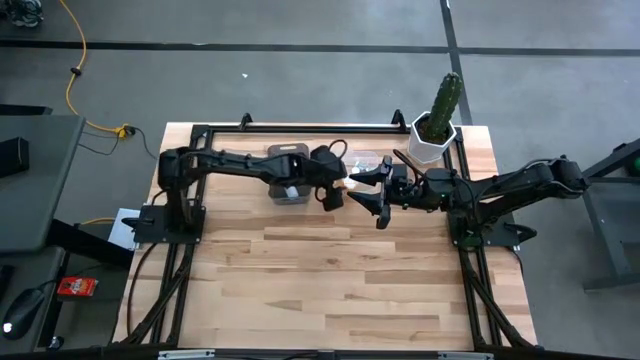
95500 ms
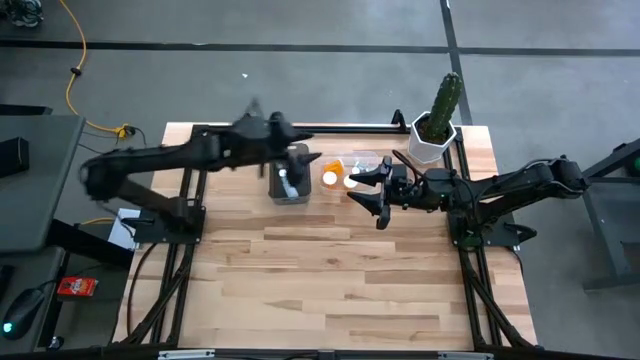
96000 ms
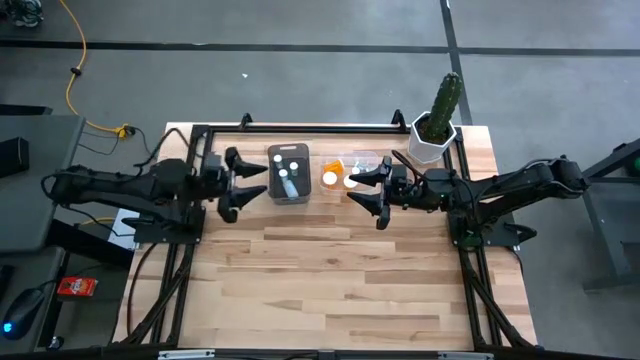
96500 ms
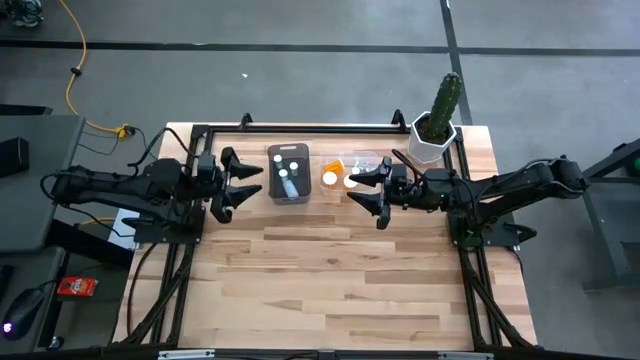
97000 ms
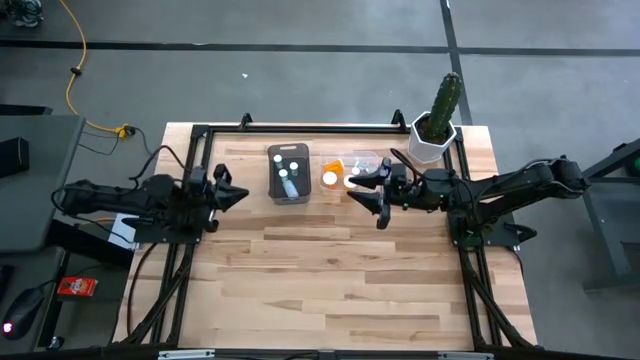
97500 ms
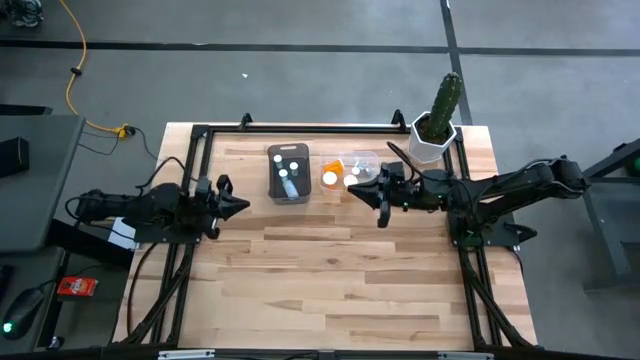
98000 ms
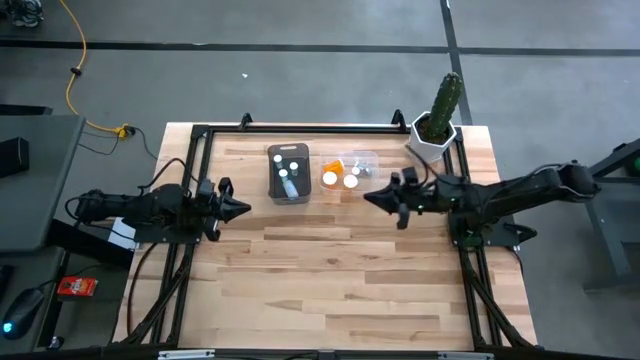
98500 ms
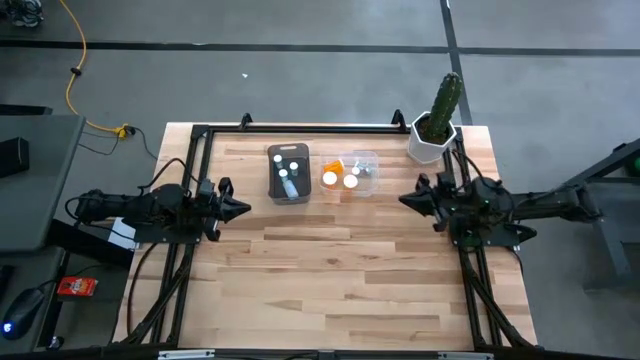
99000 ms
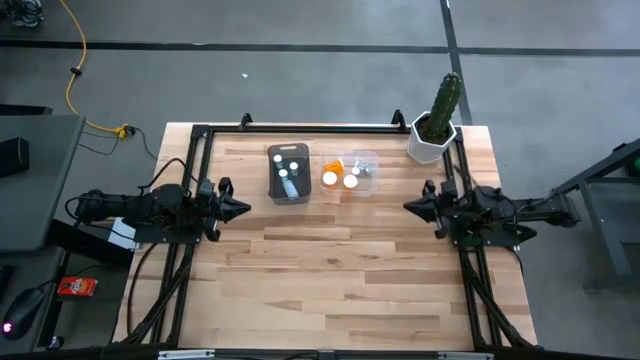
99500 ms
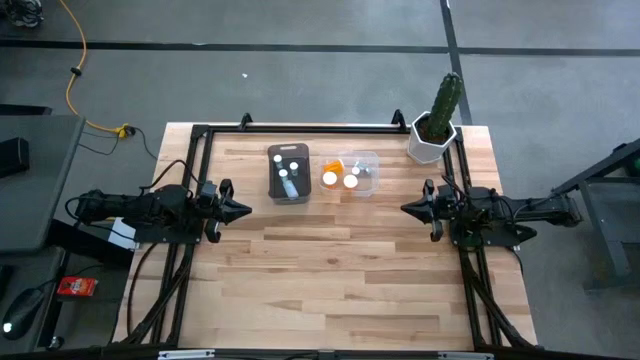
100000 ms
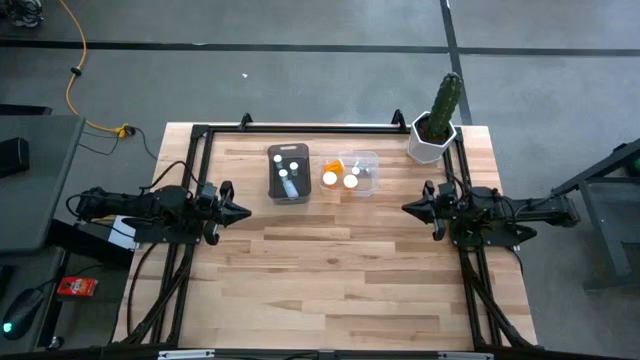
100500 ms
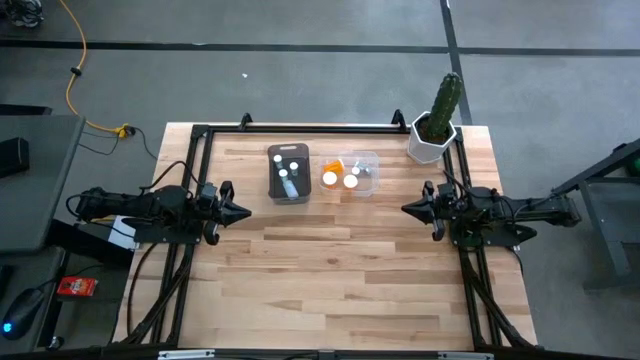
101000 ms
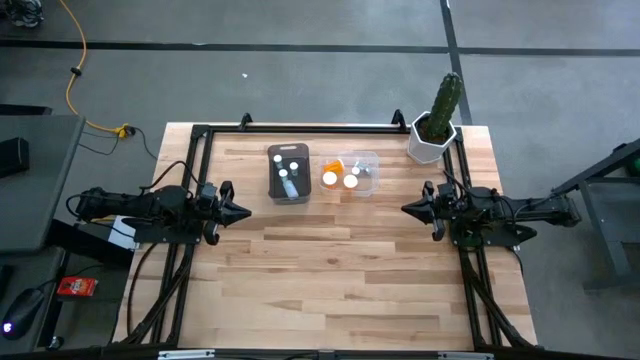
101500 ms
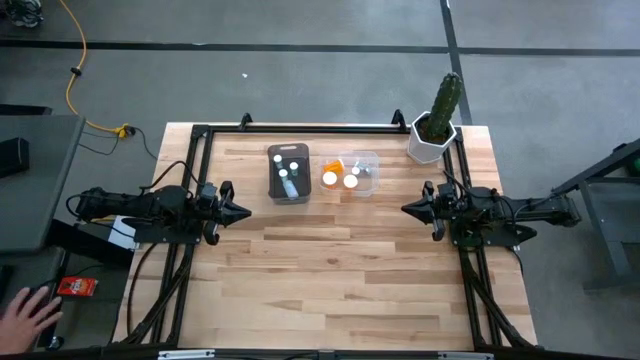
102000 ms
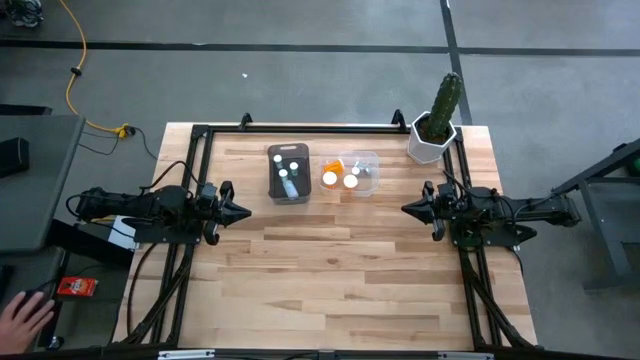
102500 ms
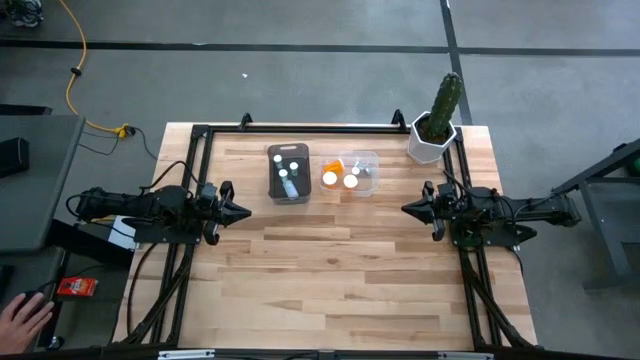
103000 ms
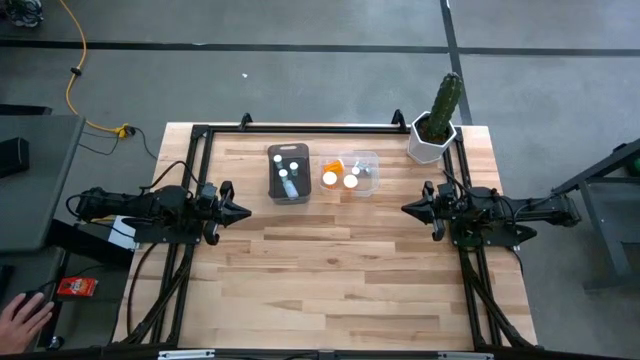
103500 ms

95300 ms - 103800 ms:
Task: Pick and place medicine bottles into bin by pill shape (circle, oval)
Return to Home Position

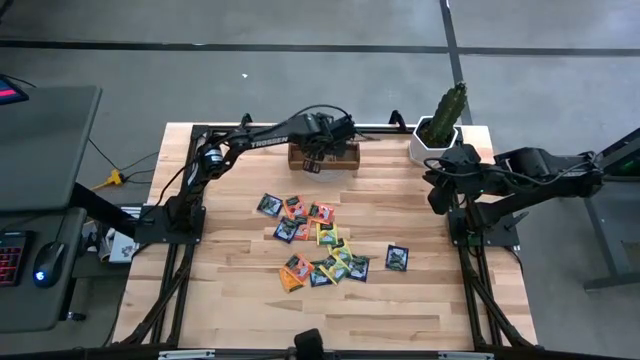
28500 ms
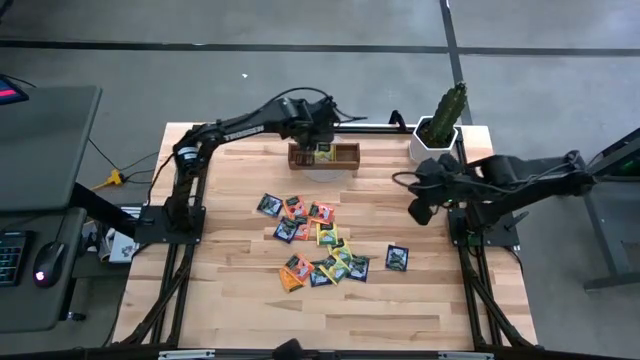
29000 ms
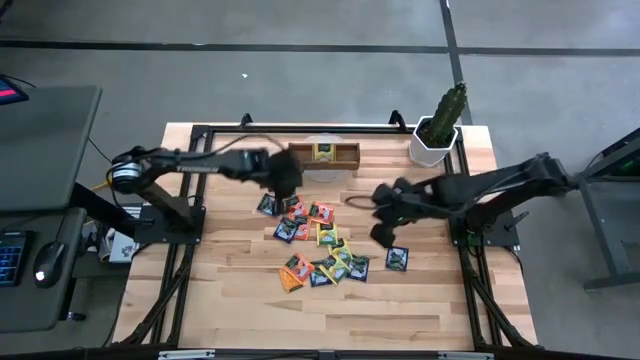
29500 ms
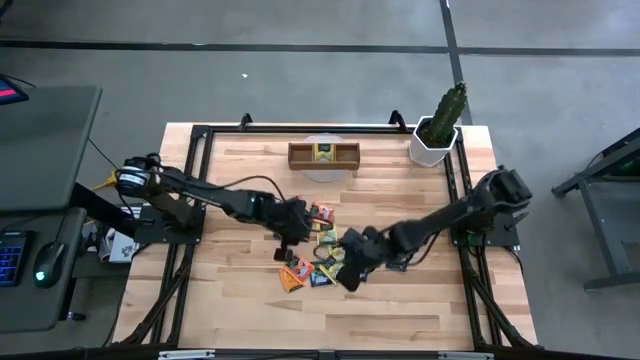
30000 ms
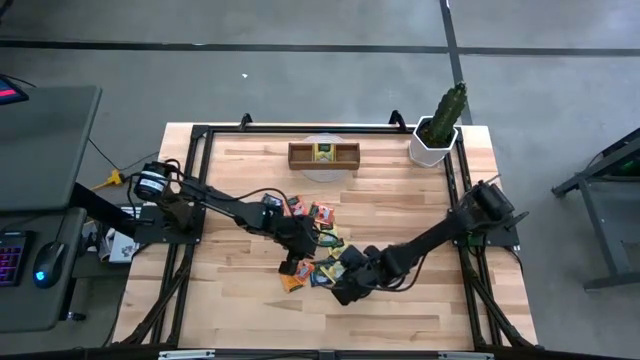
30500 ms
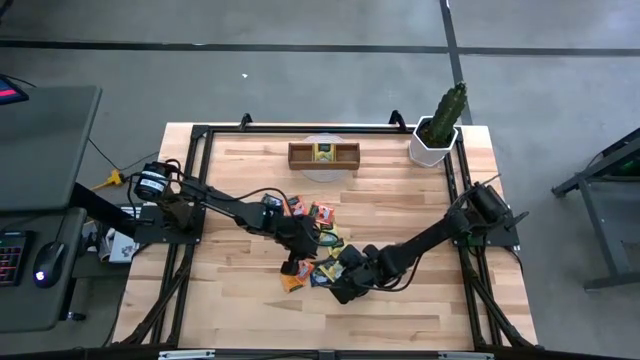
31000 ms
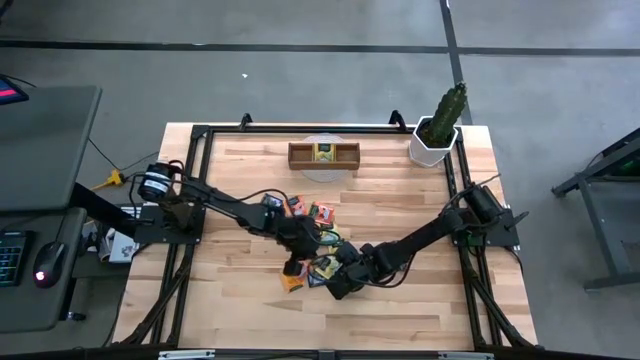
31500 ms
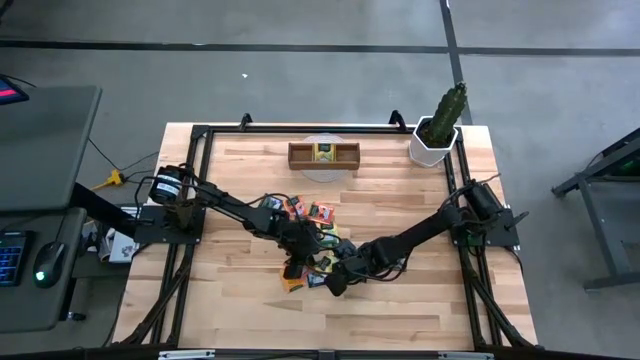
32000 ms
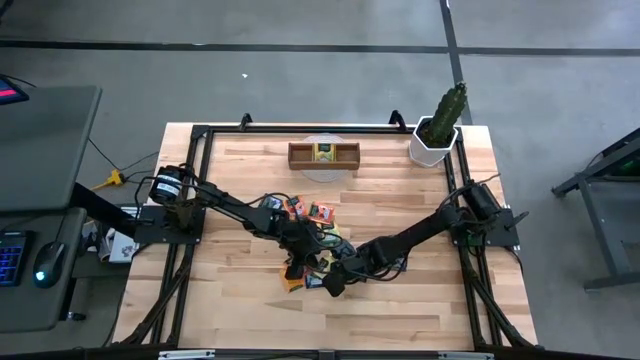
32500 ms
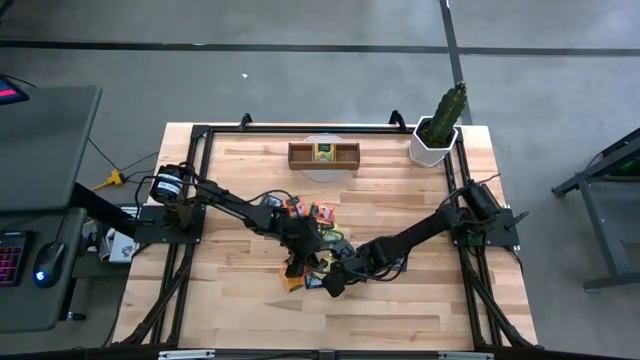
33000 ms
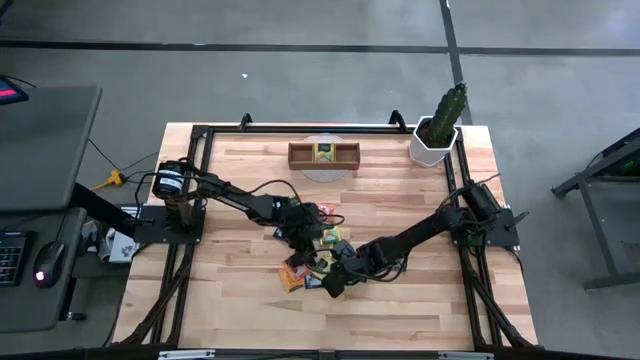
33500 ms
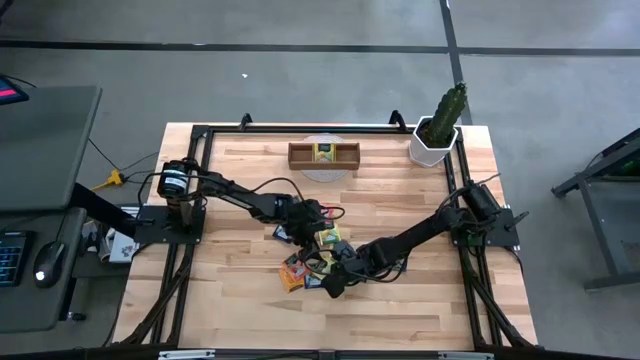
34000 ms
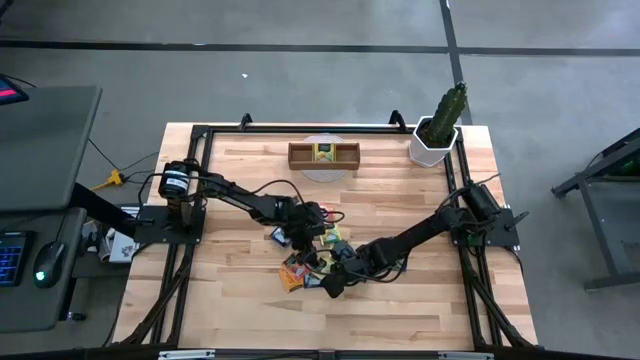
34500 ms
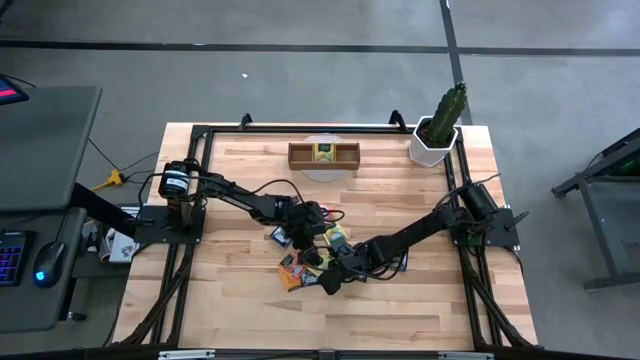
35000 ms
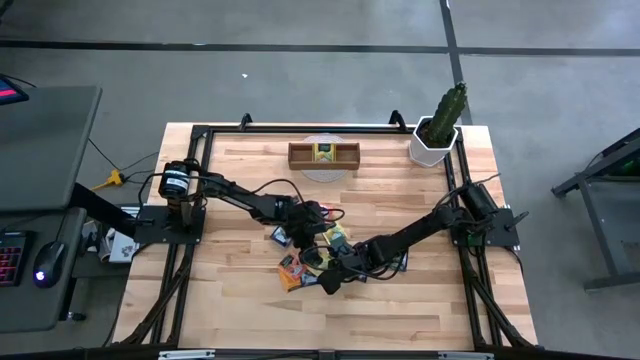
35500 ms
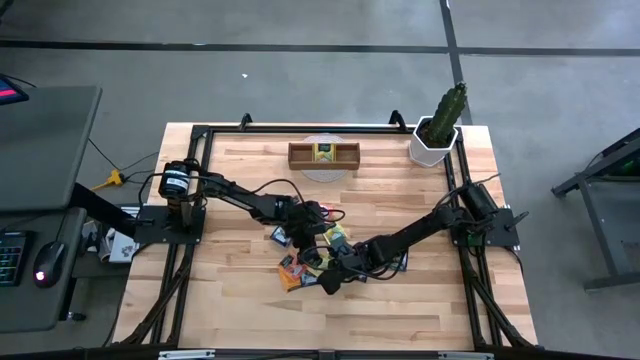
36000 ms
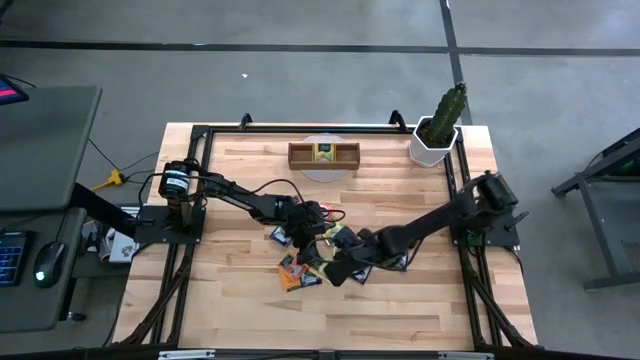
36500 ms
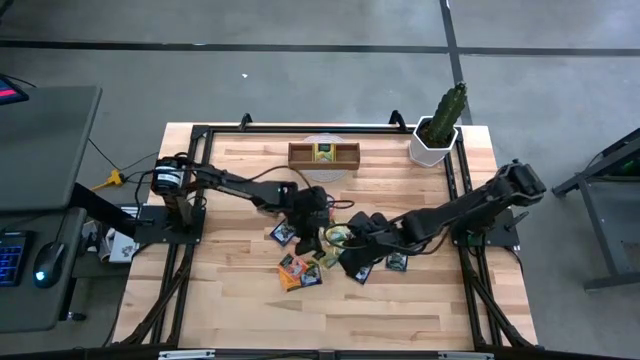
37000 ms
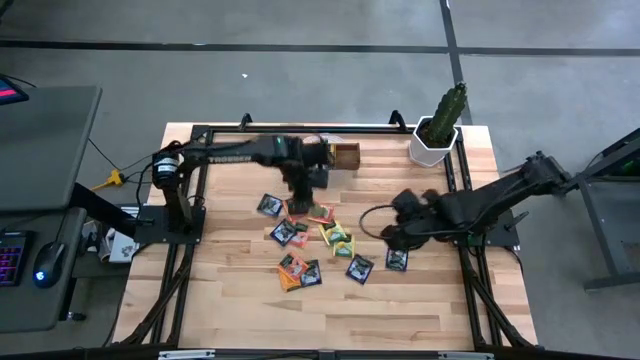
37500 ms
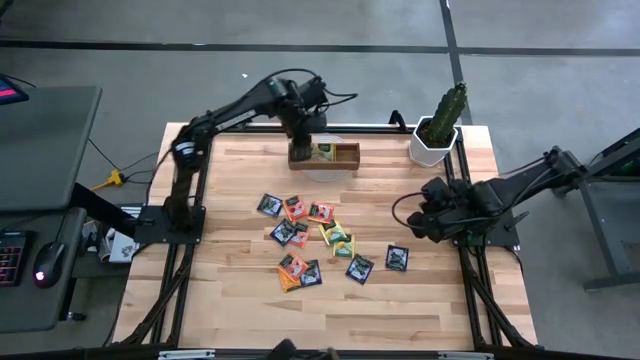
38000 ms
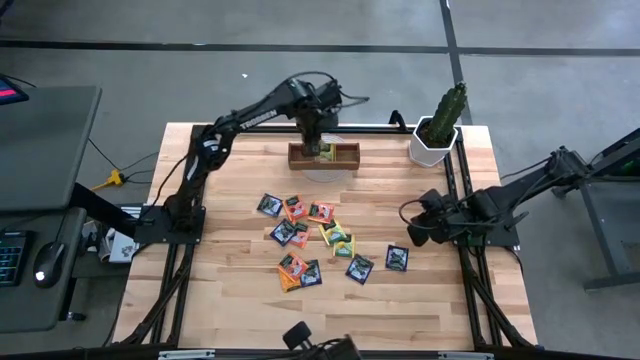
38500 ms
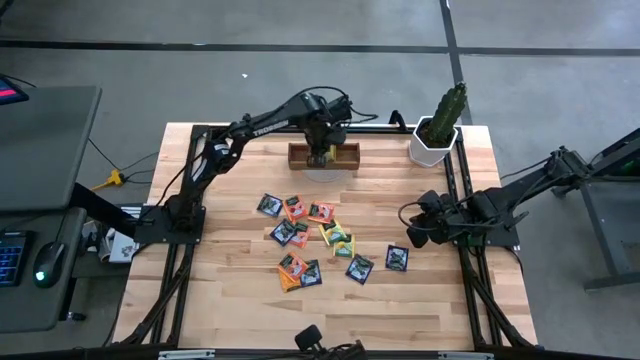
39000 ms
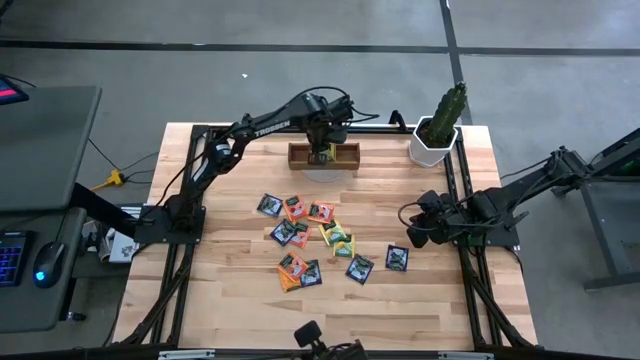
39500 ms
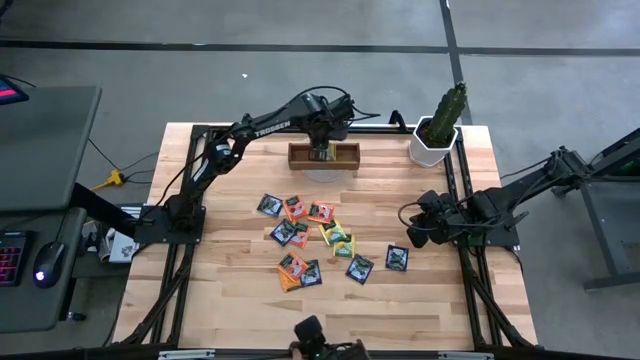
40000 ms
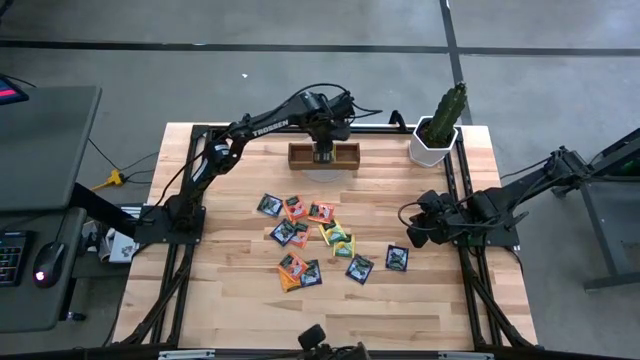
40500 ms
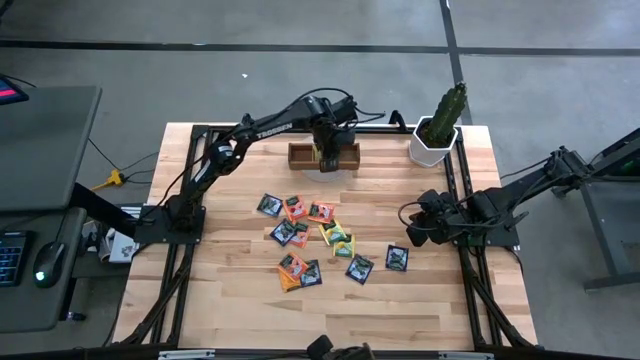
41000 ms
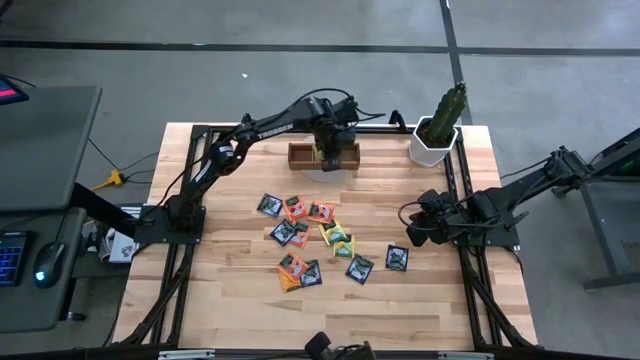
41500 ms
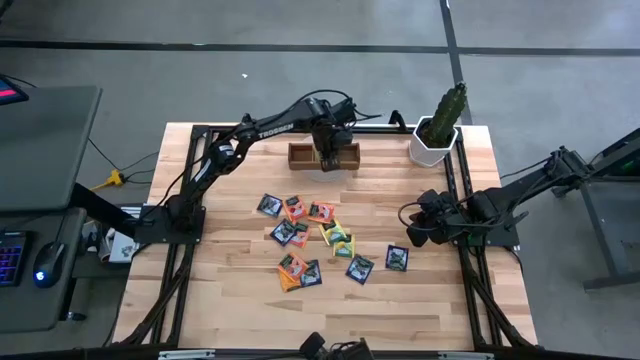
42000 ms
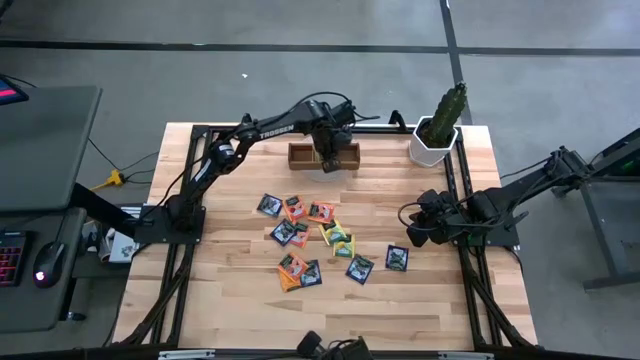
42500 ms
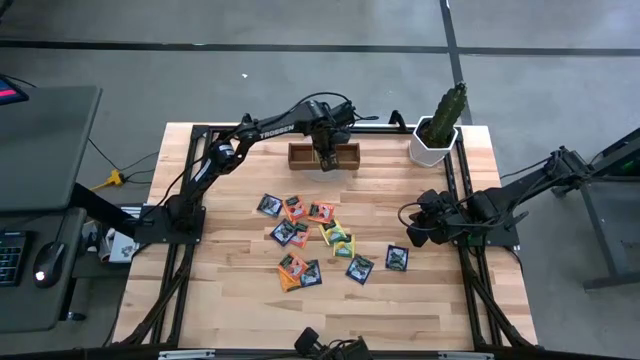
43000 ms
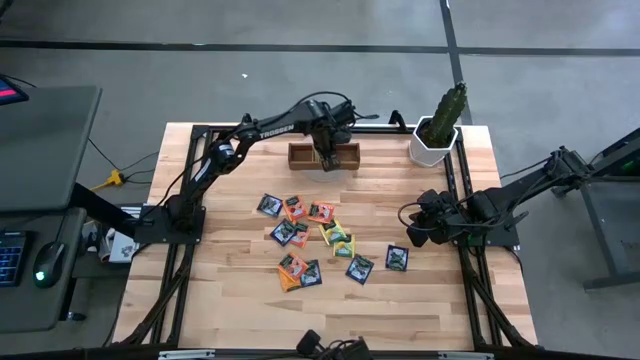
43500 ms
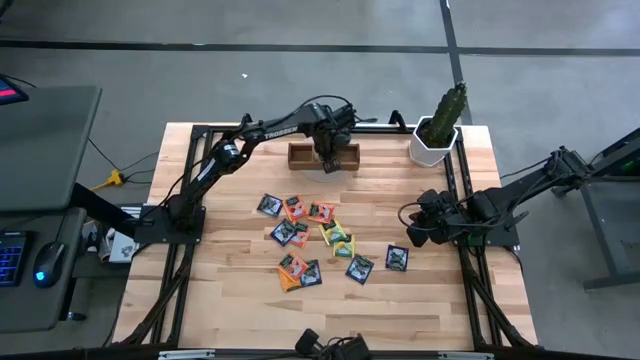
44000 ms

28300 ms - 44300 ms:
Task: Pick & Place Tea
Put the bottom yellow tea bag in the middle compartment of the organizer
